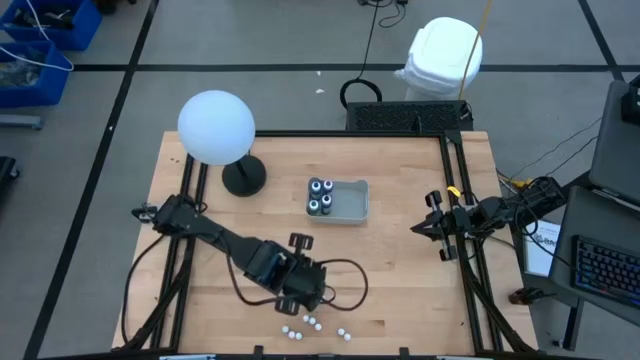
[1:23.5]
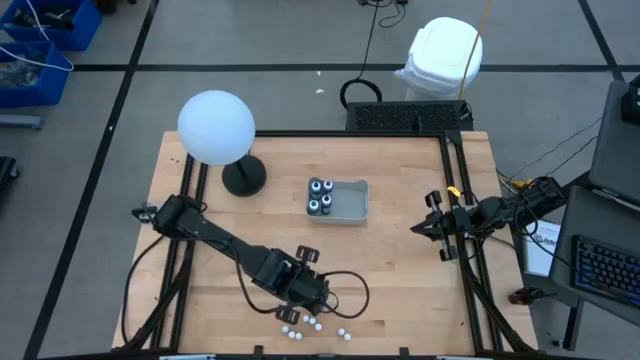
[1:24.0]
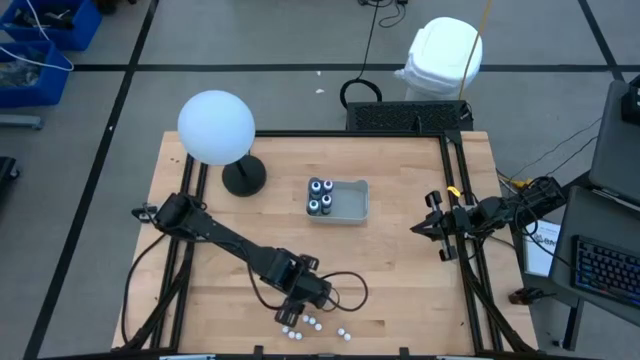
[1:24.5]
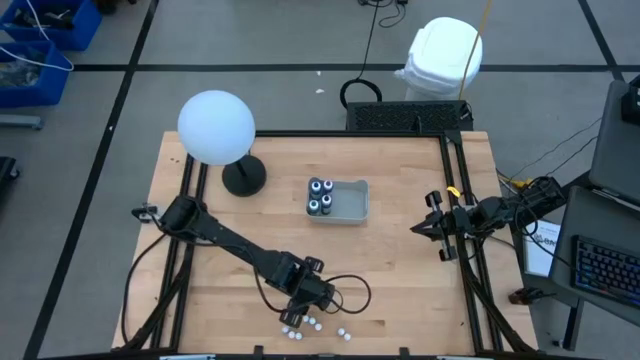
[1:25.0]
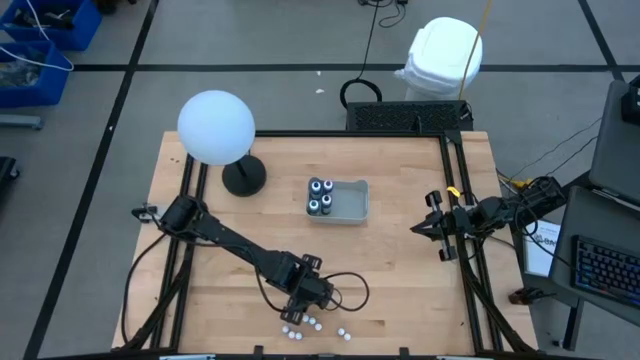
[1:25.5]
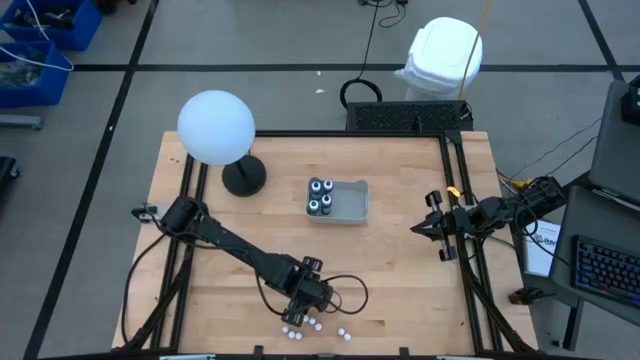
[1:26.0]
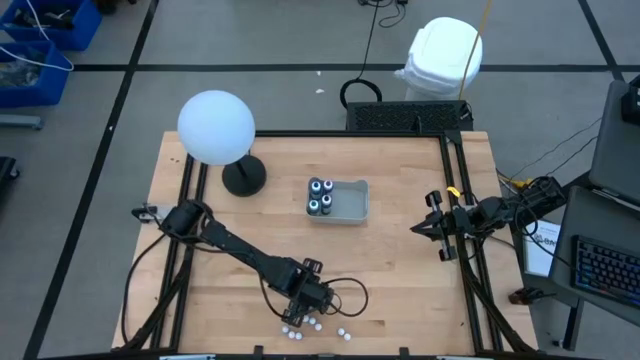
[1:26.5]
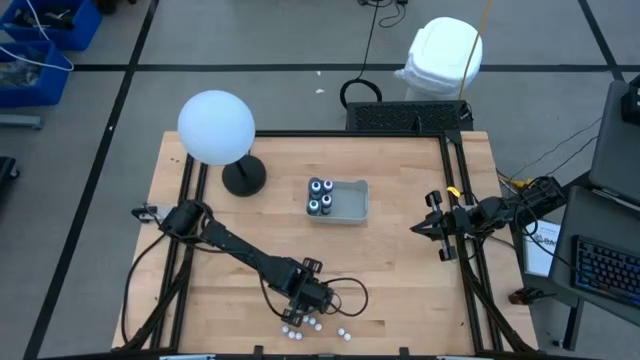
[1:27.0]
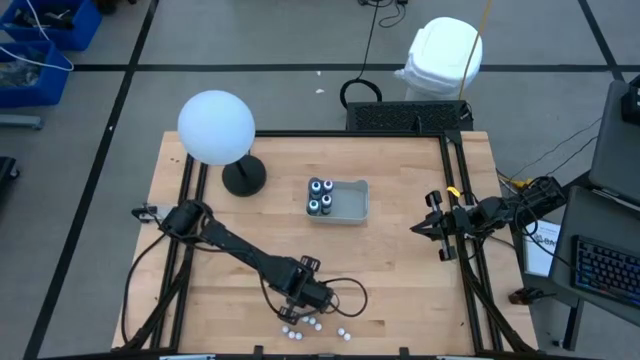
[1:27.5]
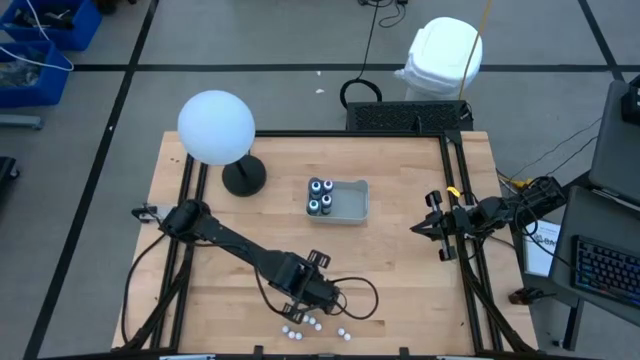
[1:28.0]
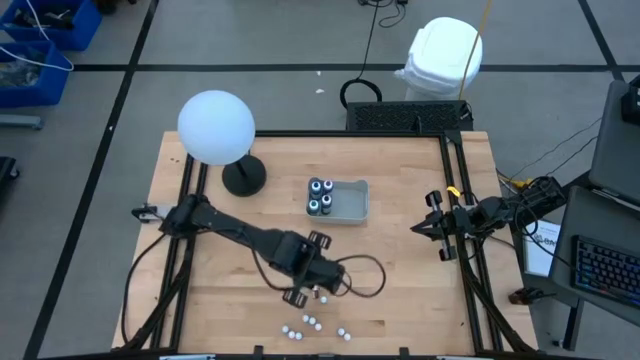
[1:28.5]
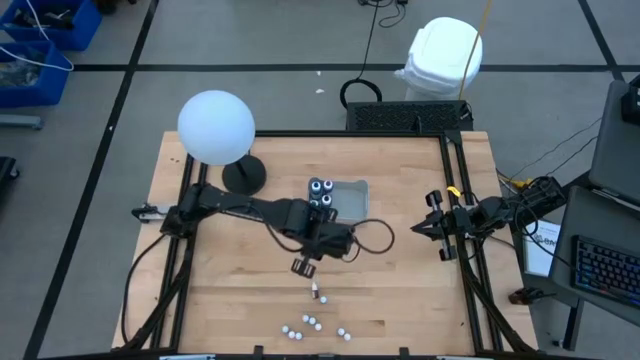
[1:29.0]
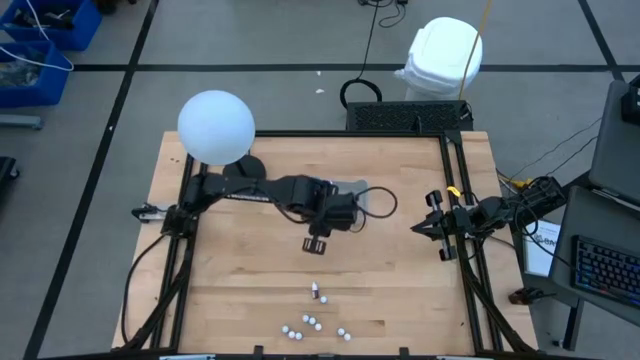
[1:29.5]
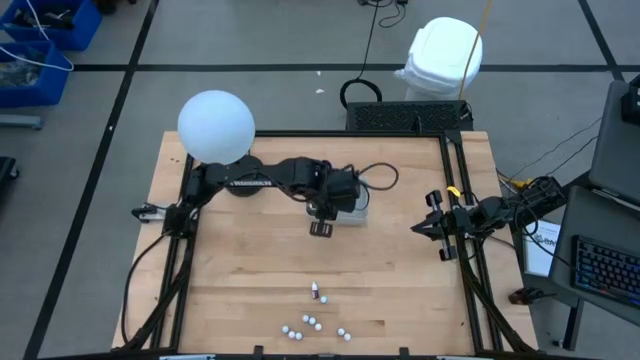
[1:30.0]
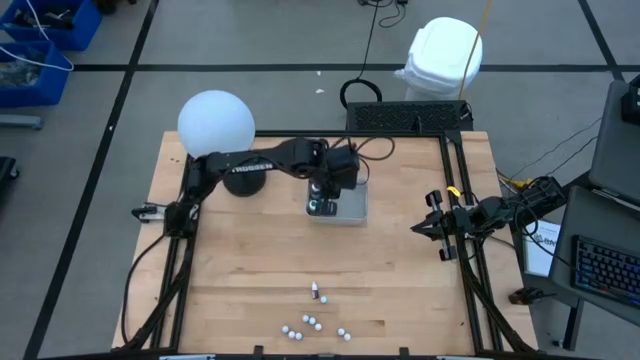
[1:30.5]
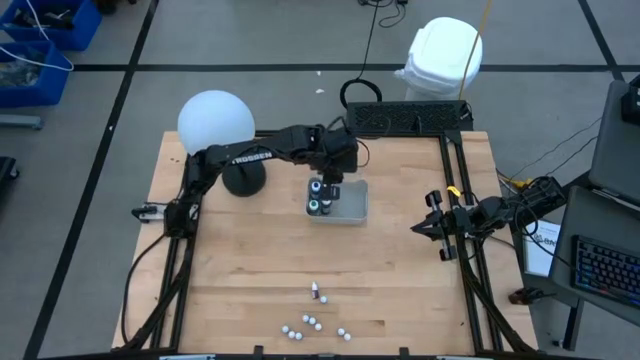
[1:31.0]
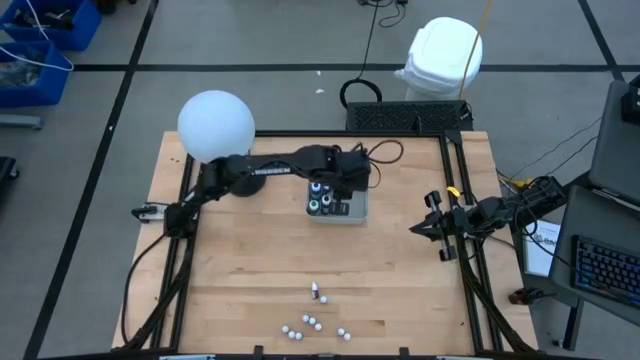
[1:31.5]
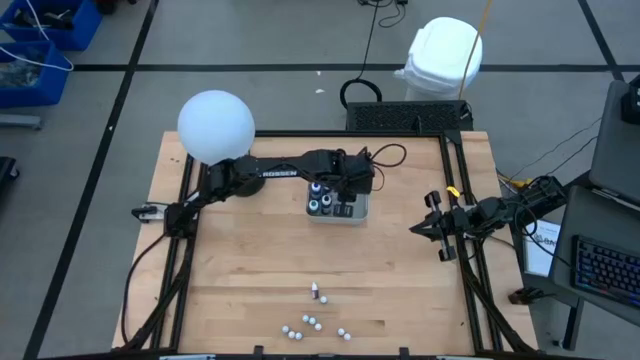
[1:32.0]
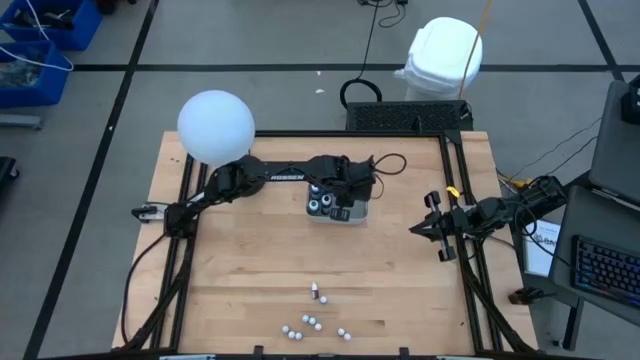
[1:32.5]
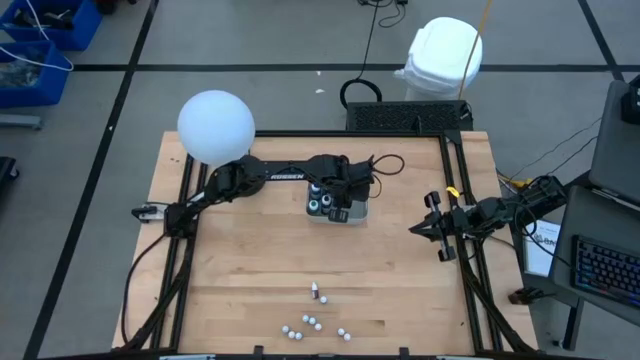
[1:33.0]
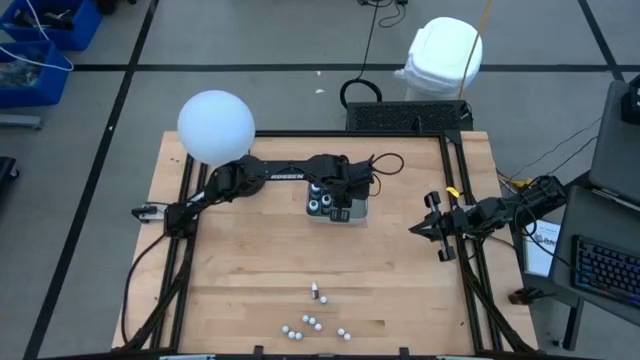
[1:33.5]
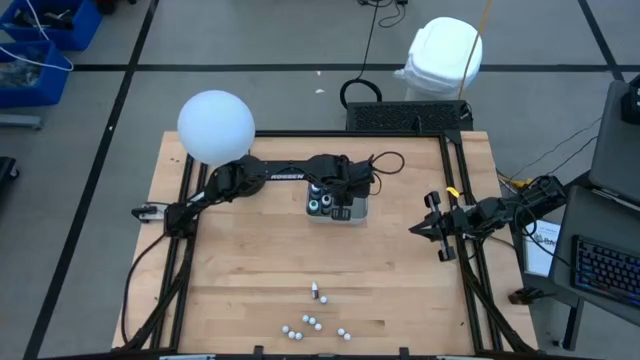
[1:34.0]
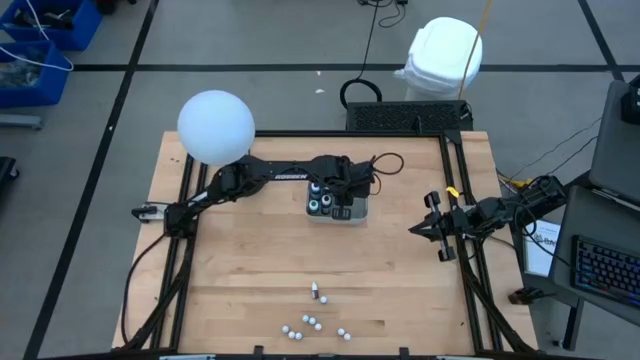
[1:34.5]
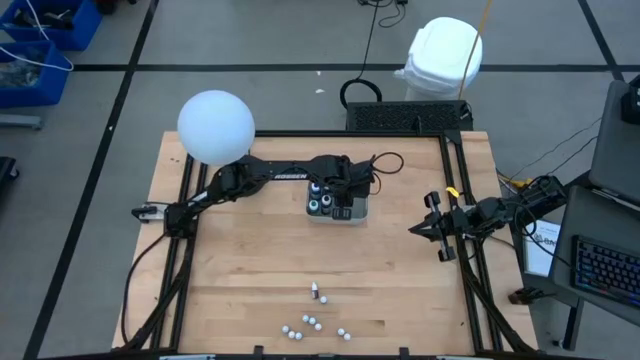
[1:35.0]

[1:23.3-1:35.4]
Task: Pick & Place food coloring
Put the top small orange food coloring bottle into the gray bin

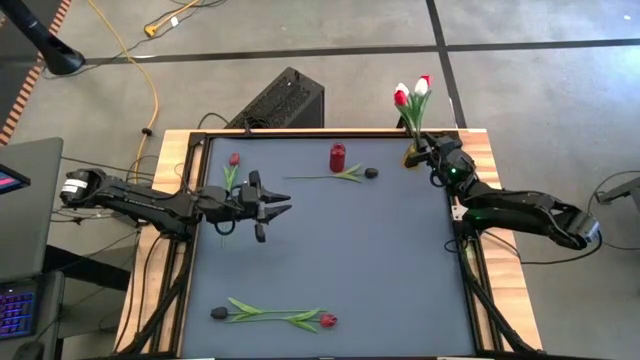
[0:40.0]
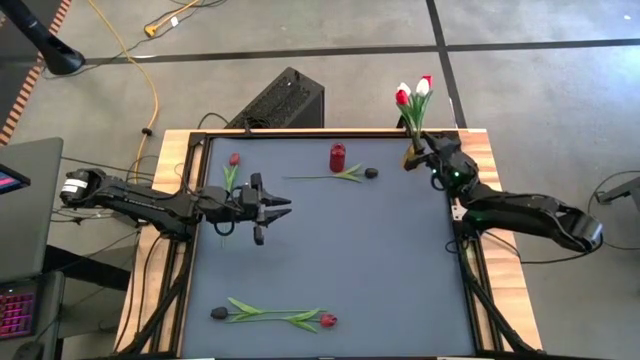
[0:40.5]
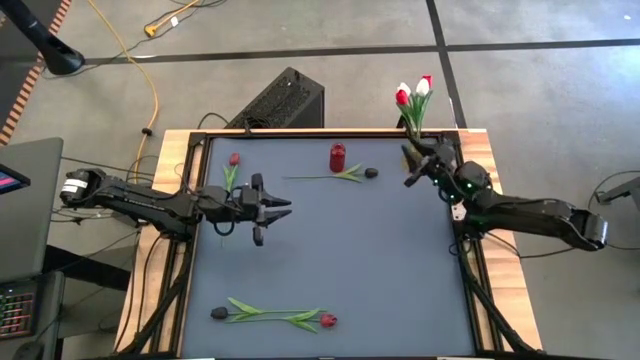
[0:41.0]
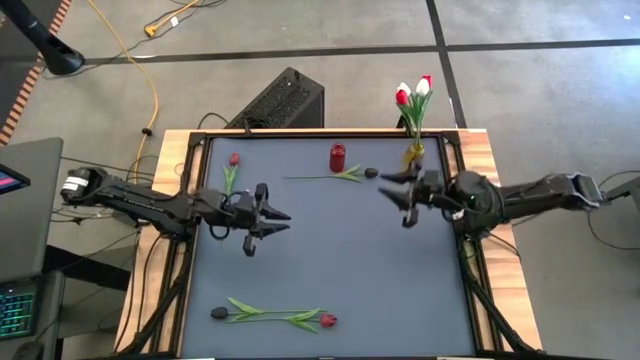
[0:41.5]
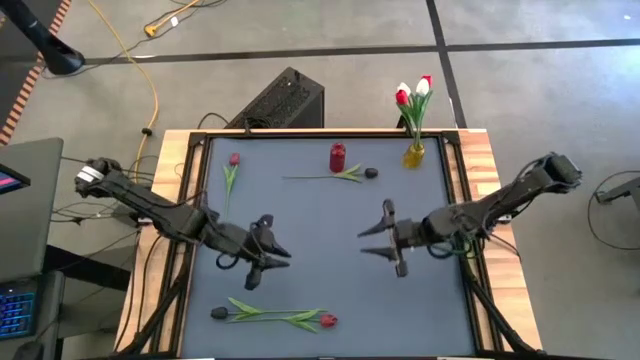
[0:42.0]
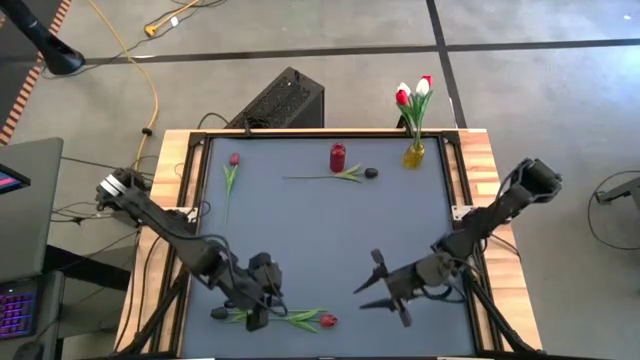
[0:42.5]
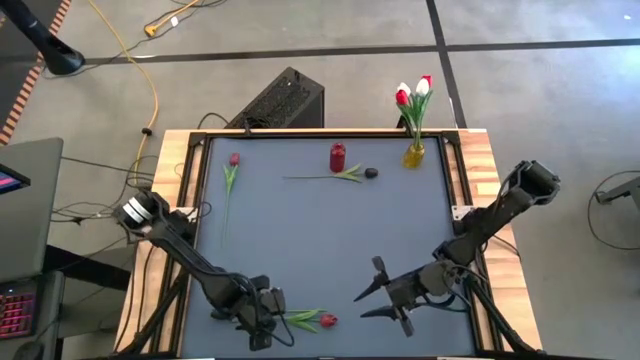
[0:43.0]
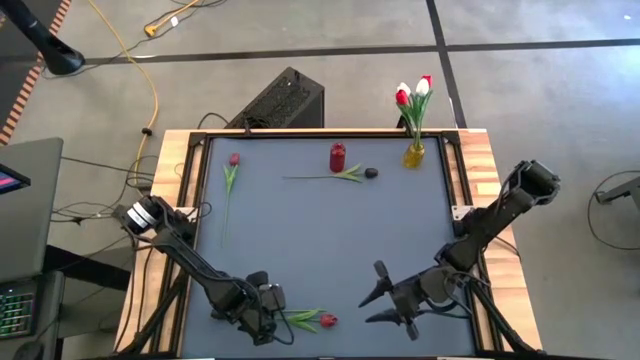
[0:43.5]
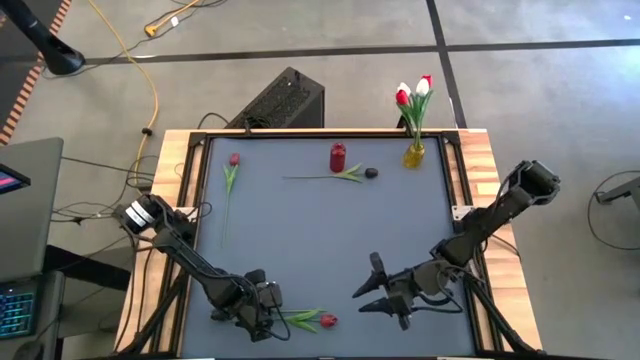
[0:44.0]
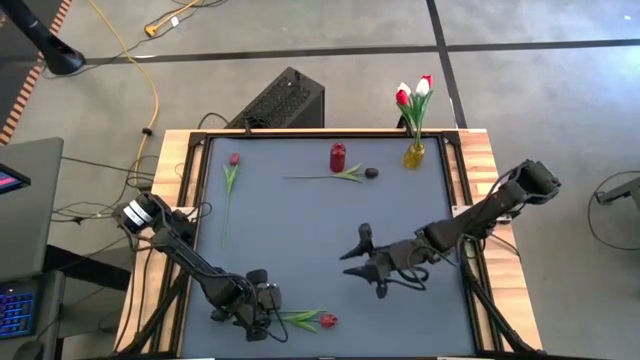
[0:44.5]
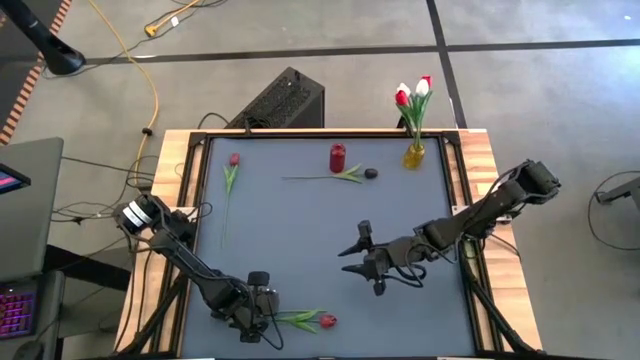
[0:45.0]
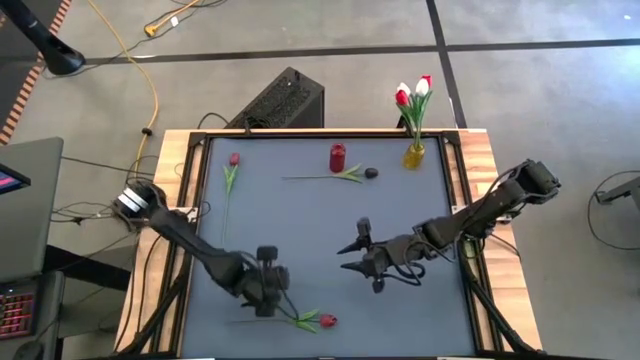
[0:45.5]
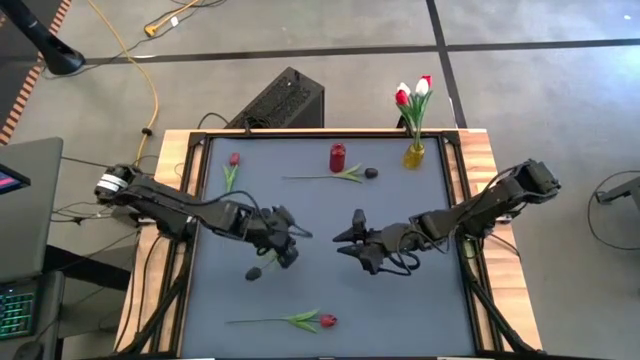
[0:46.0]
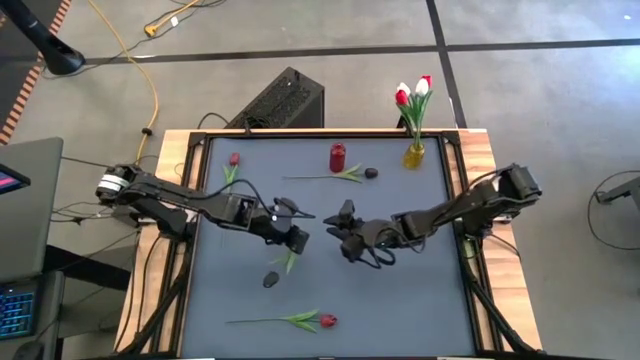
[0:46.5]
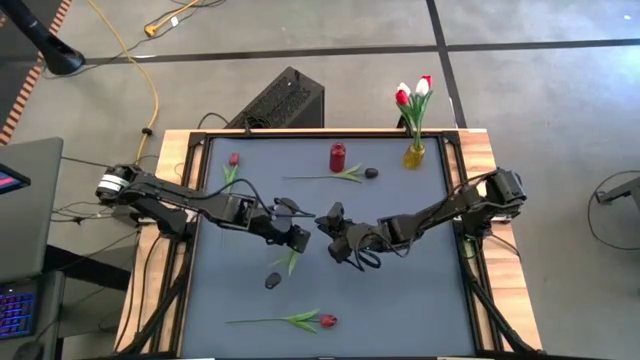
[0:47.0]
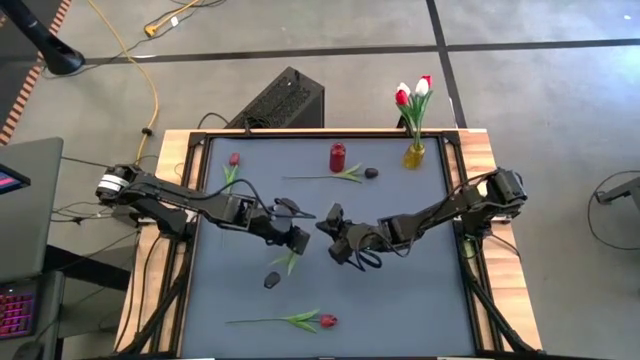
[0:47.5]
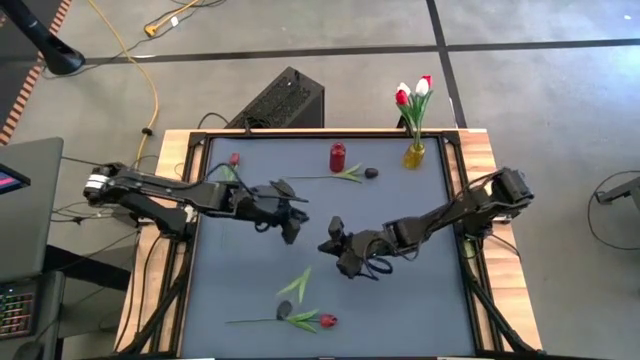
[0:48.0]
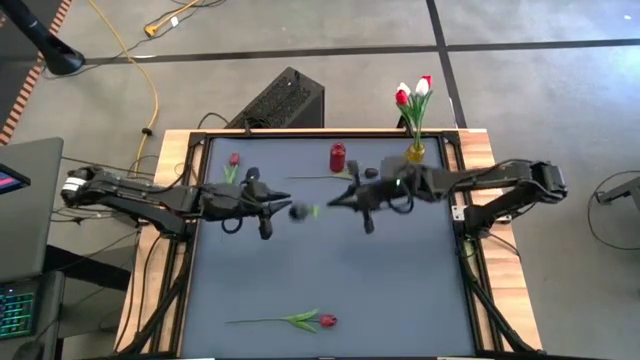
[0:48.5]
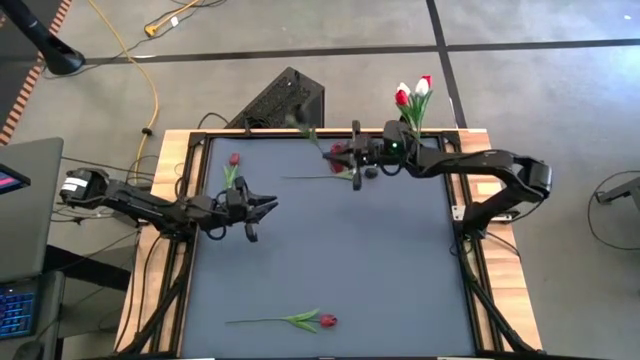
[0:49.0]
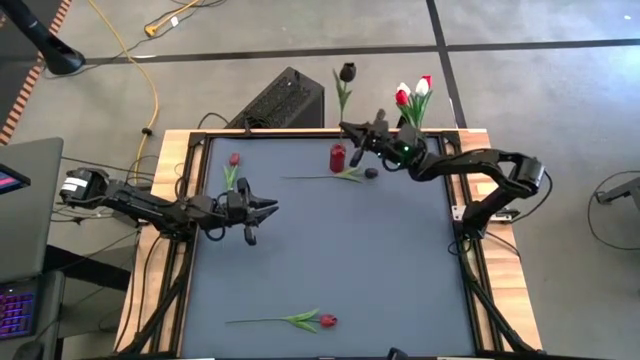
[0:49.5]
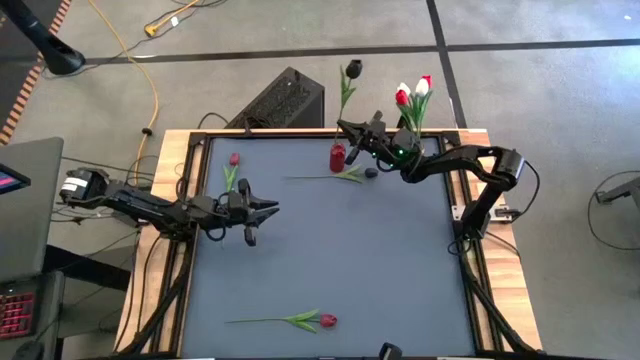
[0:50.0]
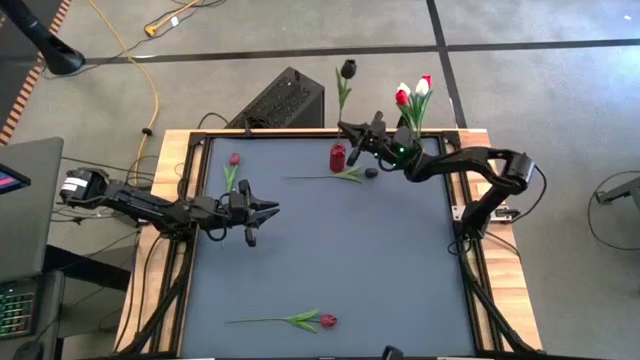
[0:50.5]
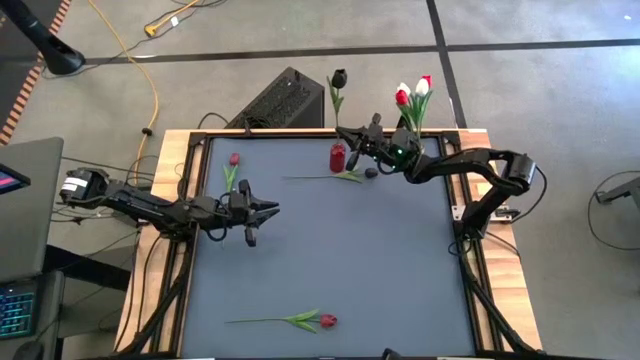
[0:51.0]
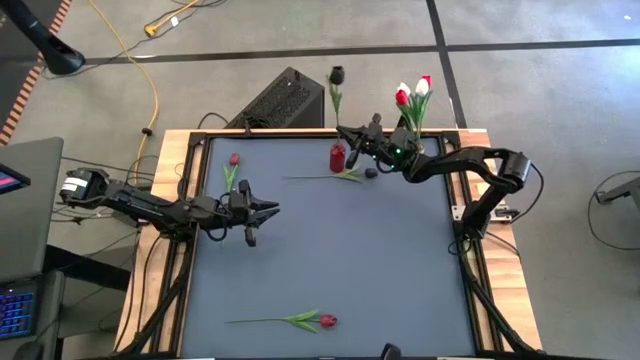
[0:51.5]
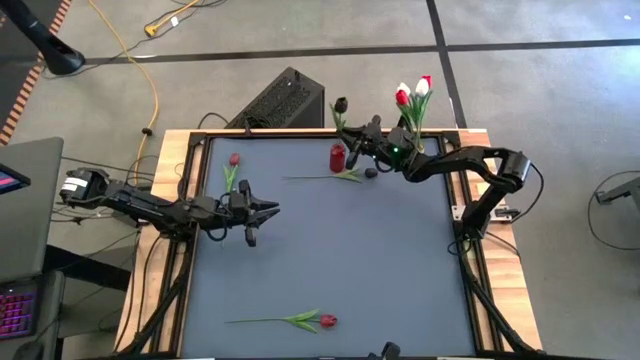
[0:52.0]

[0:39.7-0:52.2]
Task: Sort flowers into vase by color
Put the bottom black tulip into the red vase
